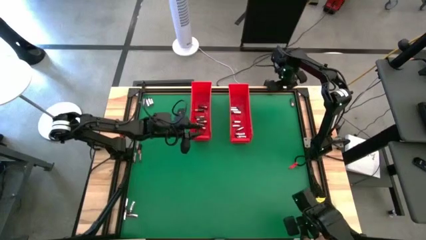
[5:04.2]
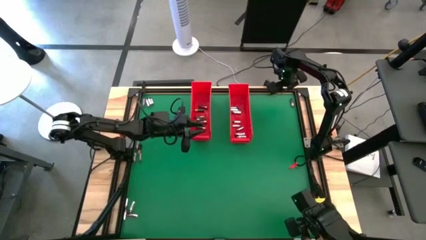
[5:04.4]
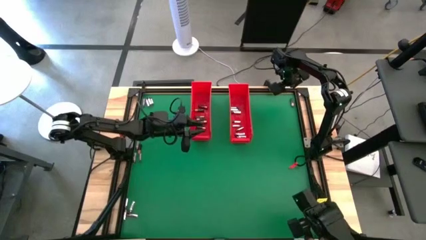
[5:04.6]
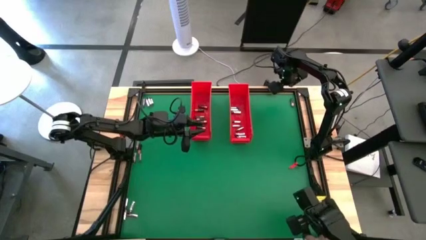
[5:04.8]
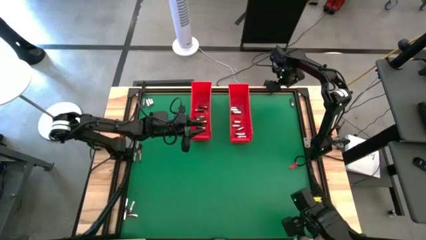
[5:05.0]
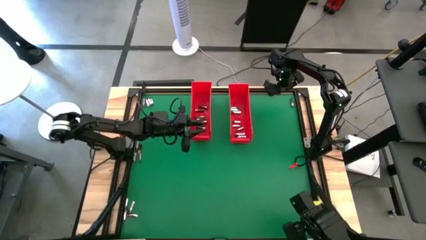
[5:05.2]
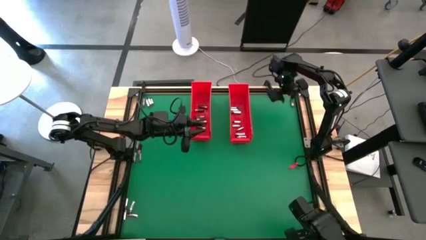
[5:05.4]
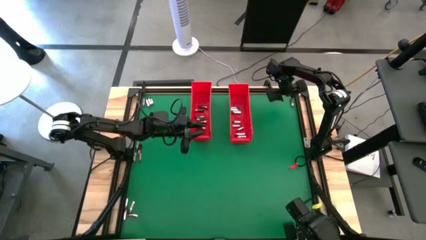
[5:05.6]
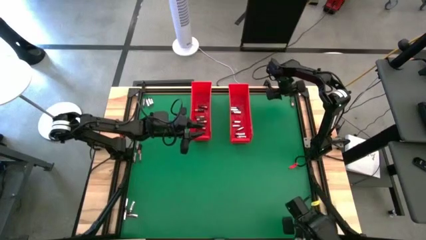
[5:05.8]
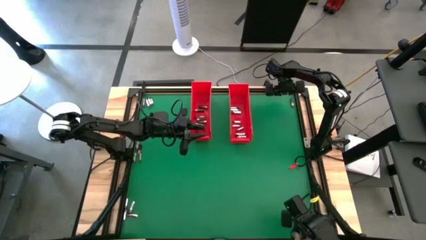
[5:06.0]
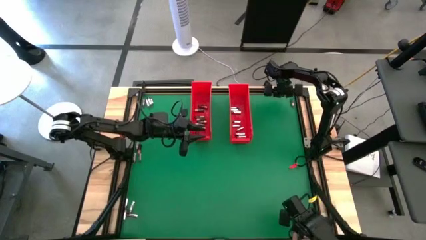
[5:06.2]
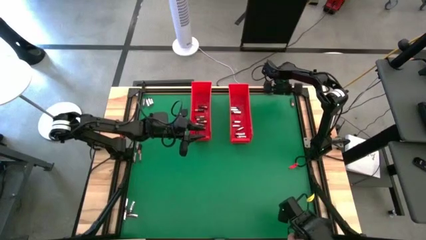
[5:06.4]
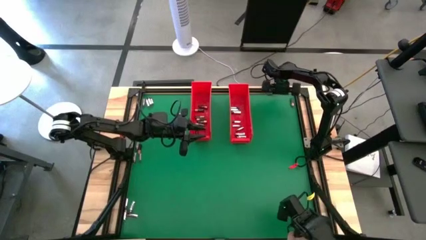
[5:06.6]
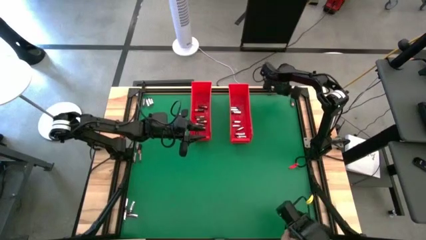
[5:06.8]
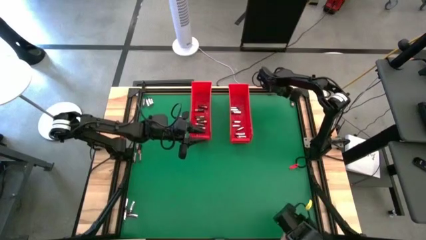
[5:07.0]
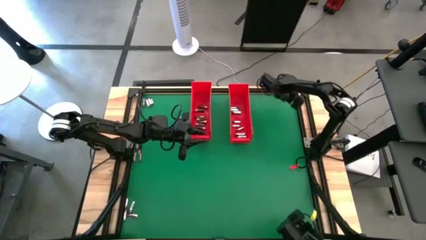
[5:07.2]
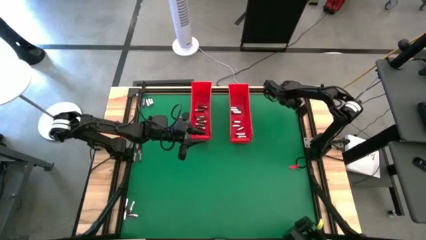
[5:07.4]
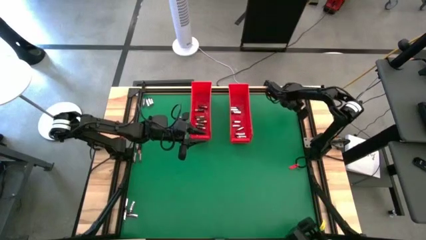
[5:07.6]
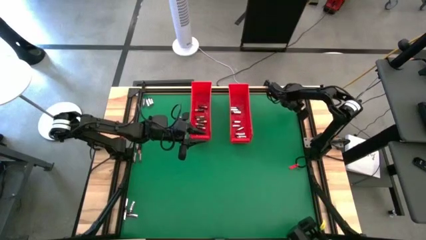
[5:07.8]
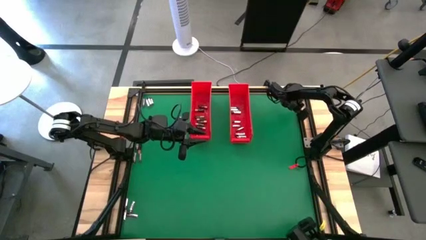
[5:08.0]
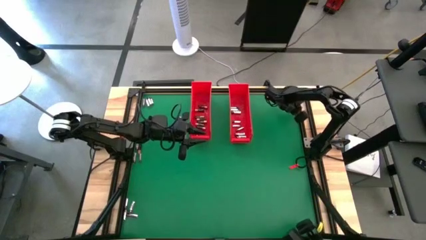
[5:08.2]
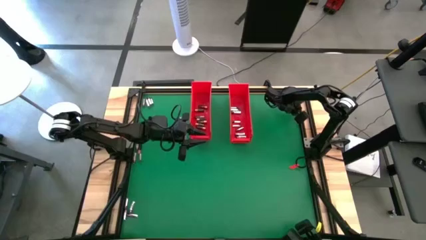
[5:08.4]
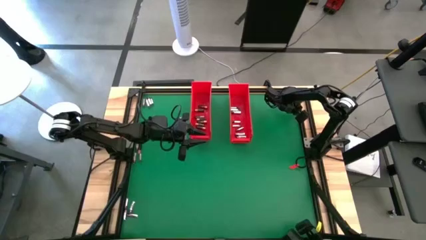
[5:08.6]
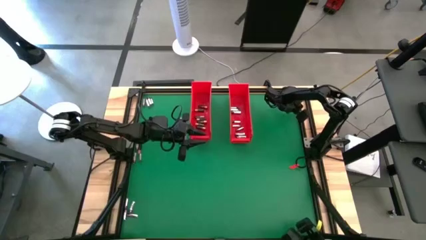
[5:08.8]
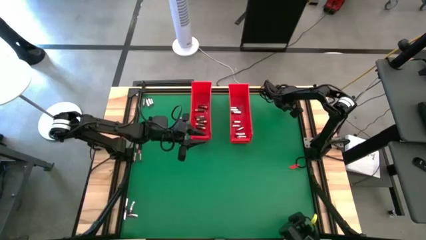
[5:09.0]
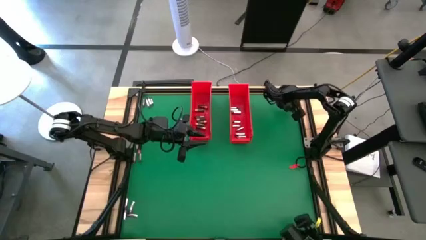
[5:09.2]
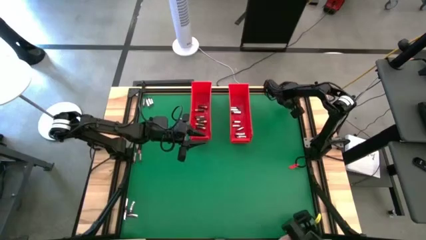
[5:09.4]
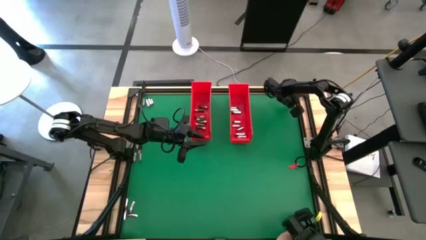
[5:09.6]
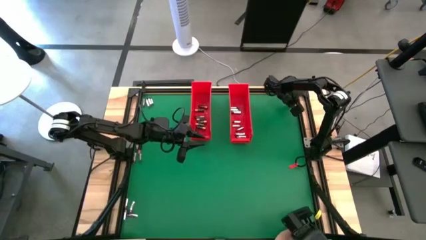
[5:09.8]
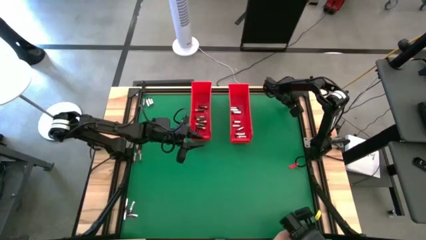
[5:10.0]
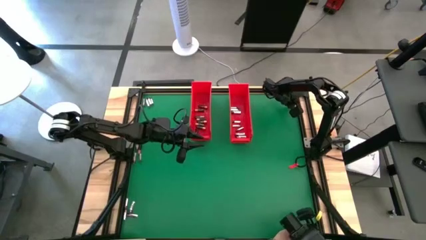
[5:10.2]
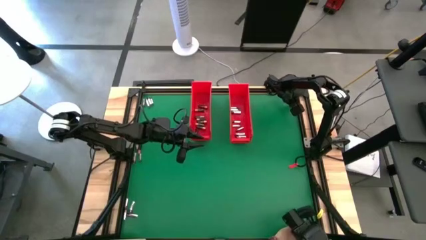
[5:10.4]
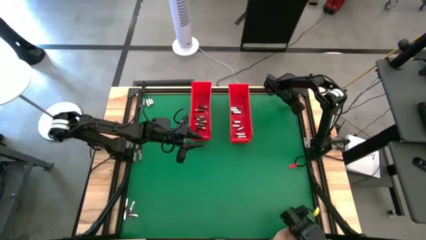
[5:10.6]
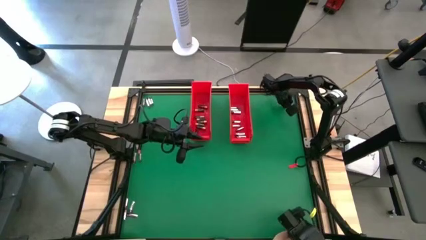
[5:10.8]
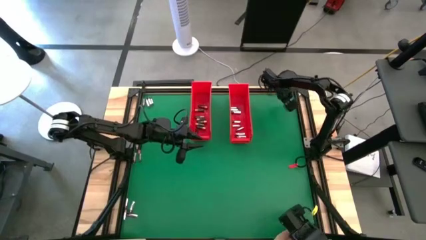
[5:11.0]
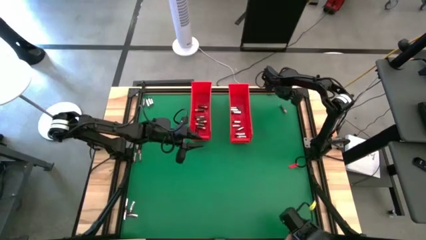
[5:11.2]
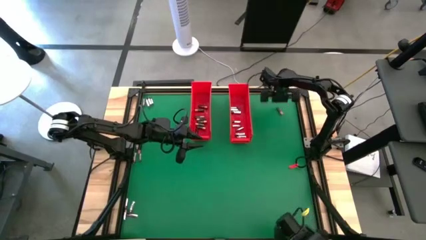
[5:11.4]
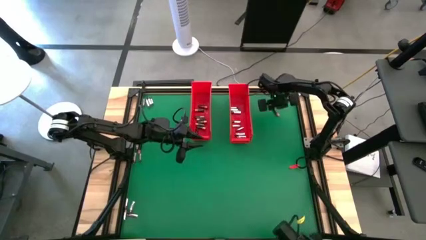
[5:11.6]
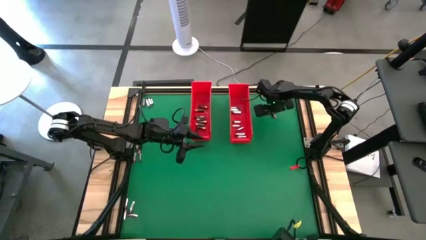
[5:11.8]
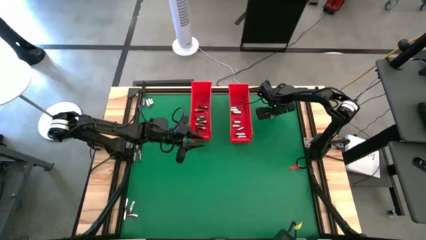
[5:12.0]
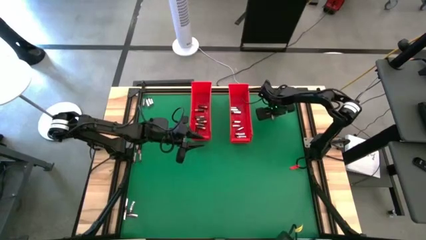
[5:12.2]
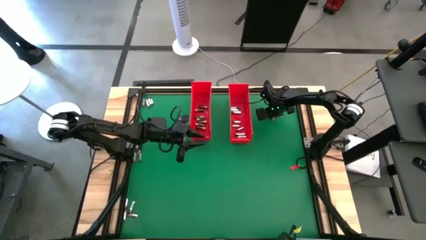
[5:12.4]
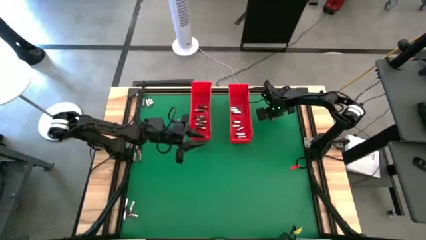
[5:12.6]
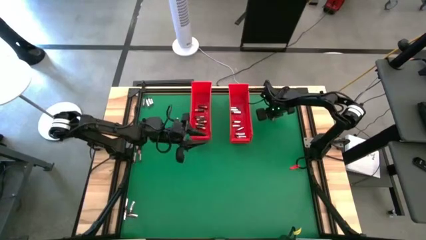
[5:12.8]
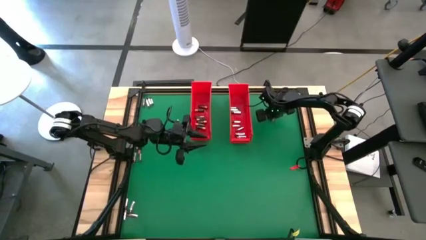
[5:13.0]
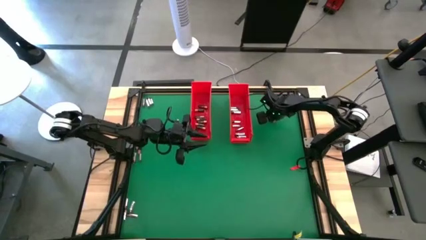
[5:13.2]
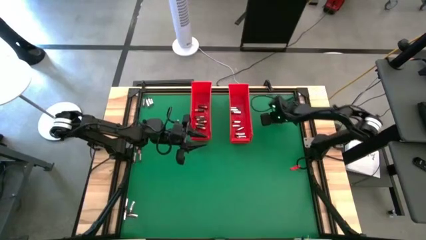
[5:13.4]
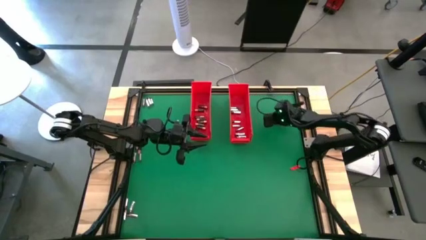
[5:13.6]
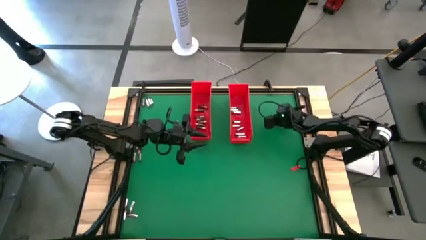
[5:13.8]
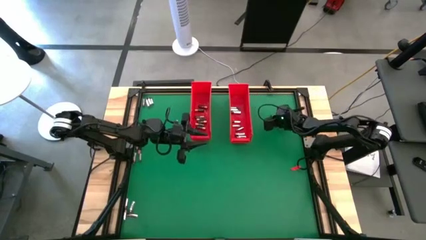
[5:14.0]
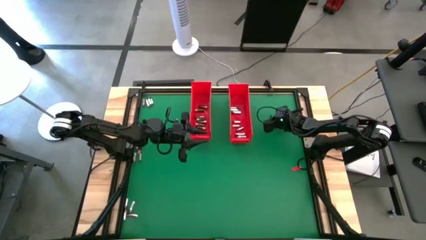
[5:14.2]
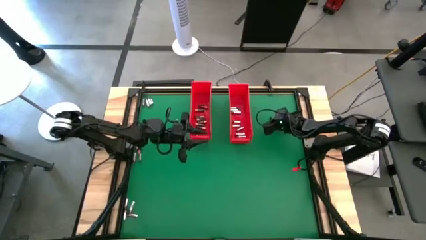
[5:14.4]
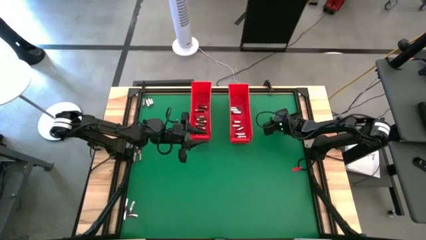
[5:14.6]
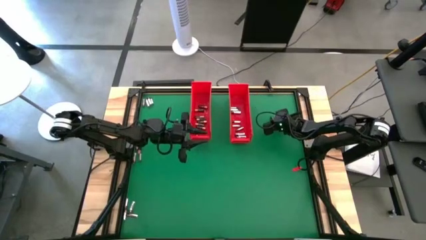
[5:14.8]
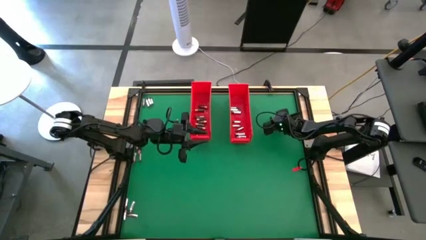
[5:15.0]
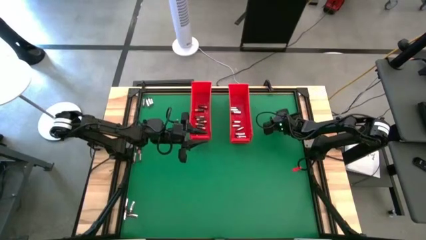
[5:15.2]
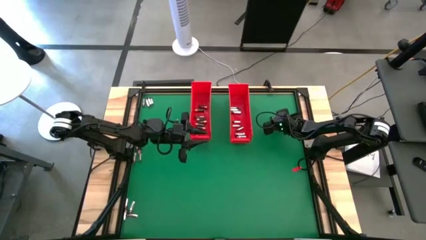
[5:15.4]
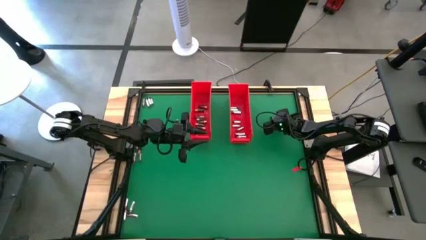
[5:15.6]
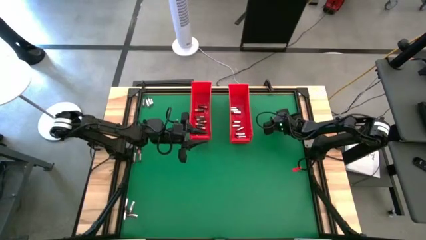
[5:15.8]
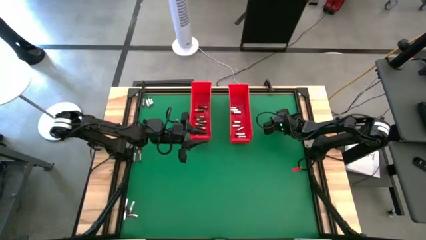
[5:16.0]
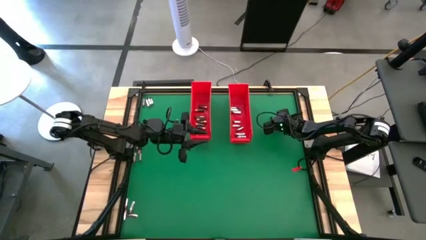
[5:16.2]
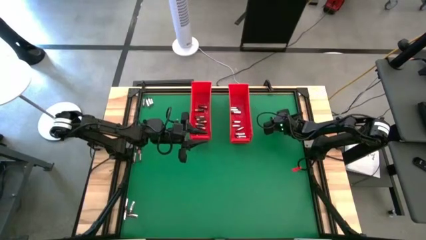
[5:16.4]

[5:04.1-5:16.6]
Task: Sort batteries
Put the brown battery into the left red bin

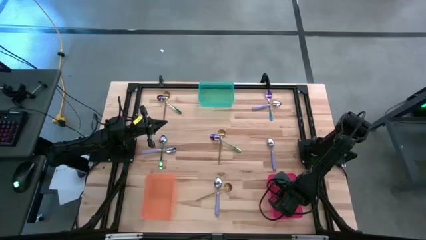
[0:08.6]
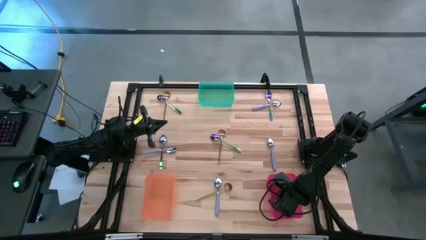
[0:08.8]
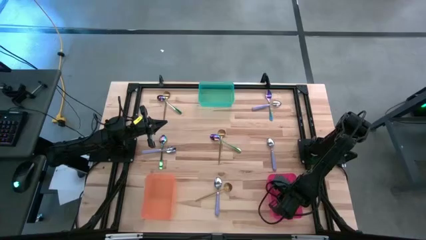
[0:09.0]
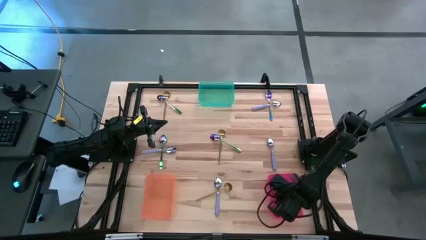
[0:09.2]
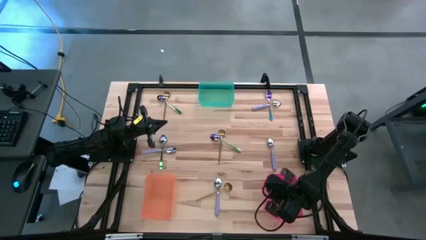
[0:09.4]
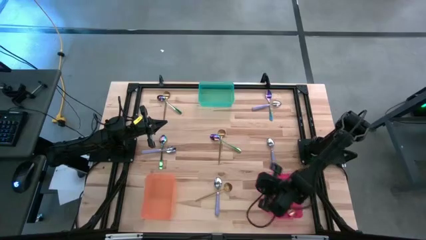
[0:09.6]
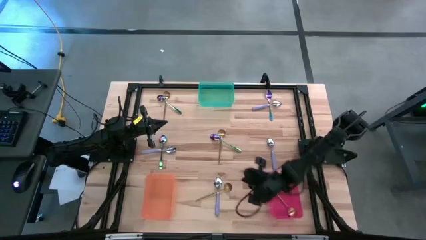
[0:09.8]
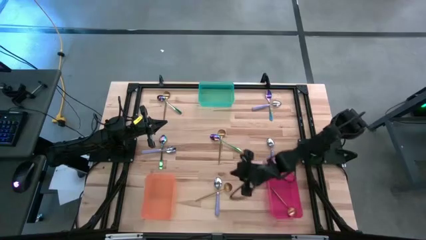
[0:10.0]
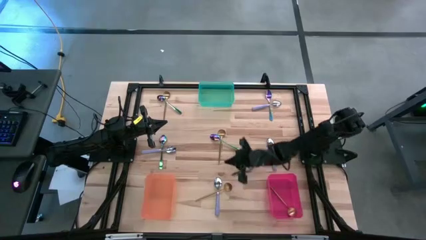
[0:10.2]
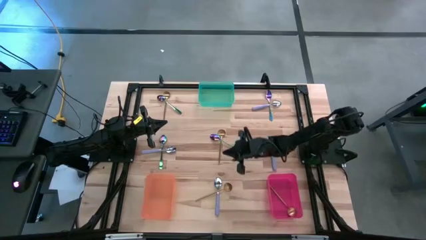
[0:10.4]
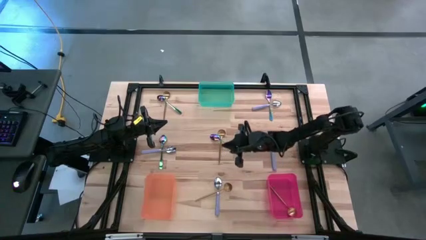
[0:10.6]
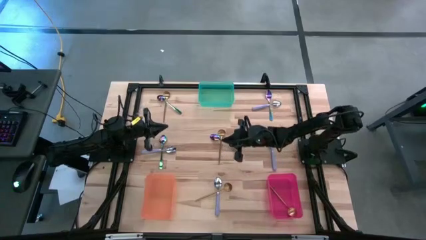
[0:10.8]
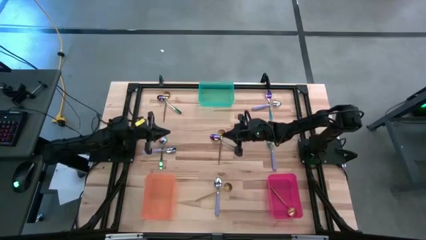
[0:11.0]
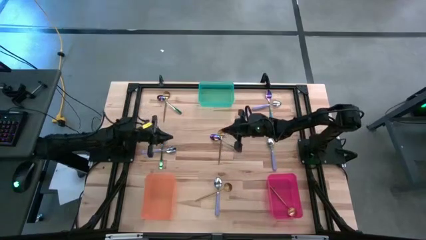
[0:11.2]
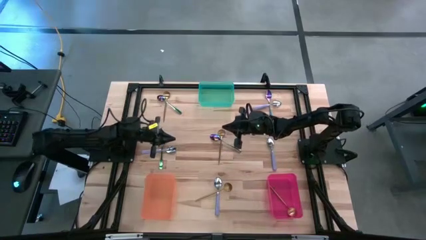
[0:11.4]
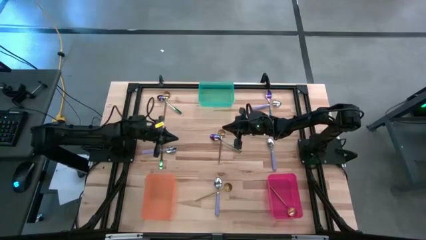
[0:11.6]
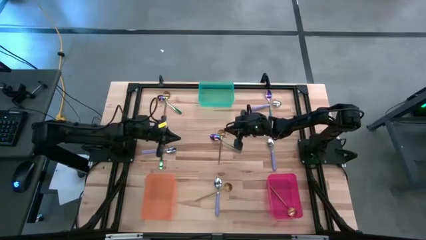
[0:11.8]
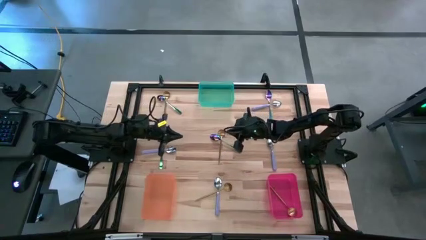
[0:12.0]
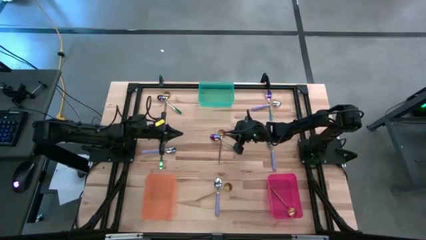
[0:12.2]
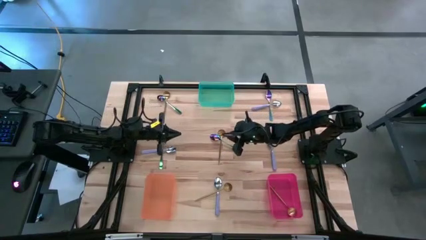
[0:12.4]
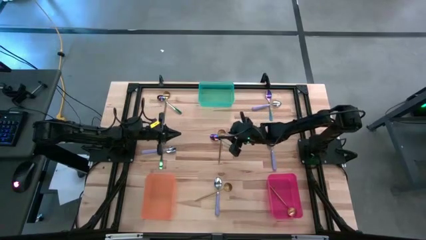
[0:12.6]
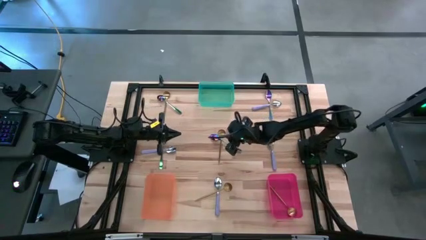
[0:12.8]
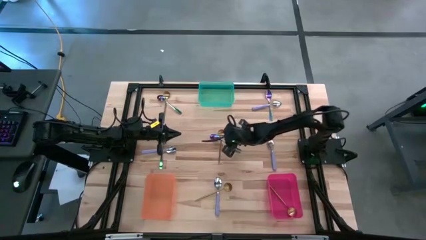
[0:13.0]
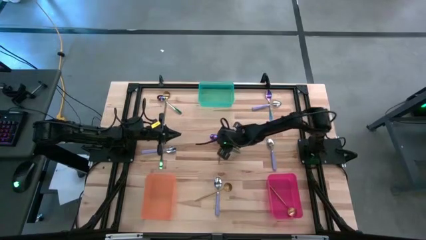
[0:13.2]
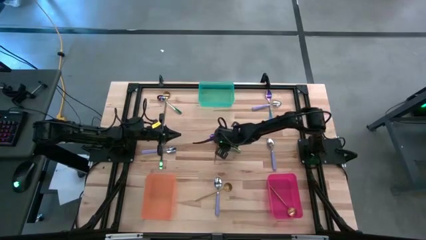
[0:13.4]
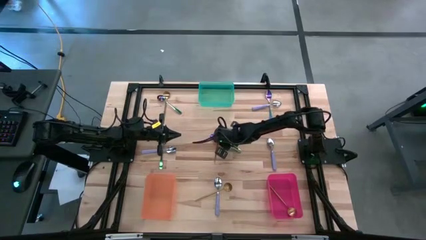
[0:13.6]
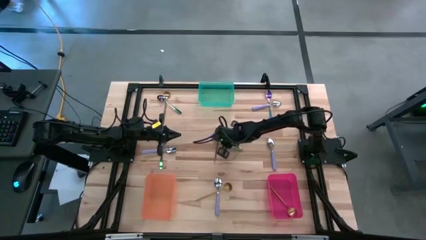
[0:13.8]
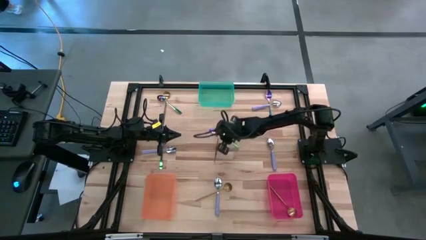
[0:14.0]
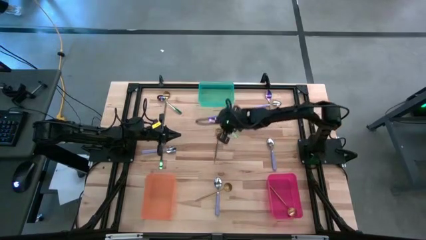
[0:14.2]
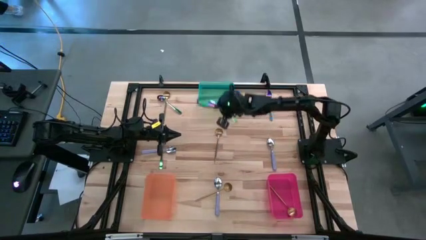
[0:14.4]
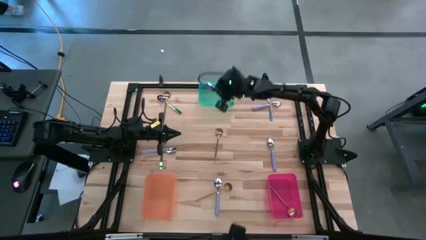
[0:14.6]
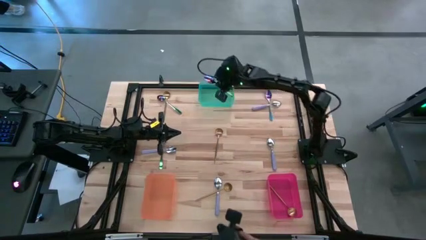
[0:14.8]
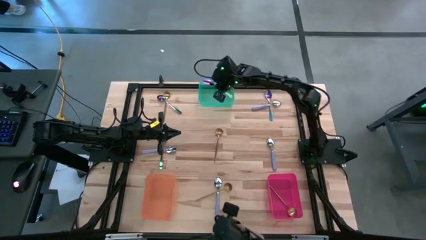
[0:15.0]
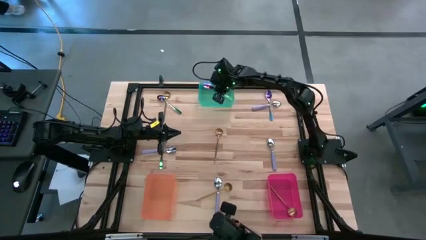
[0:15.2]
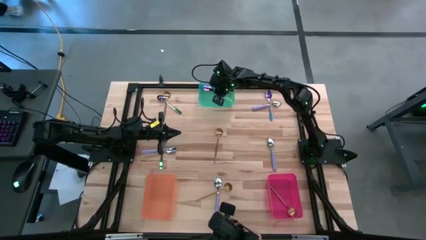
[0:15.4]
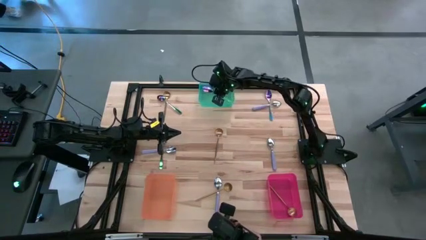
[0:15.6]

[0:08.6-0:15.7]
Task: Sort silverware by color (type)
Put the violet spoon into the blue bin
